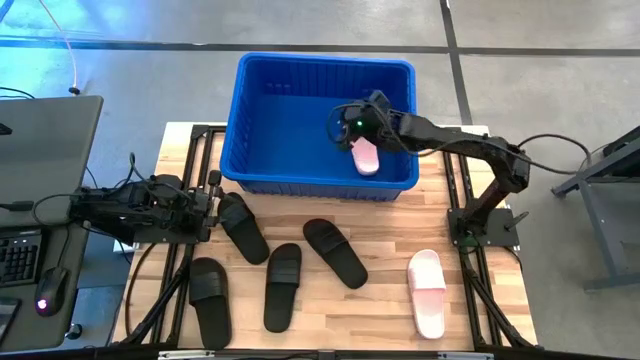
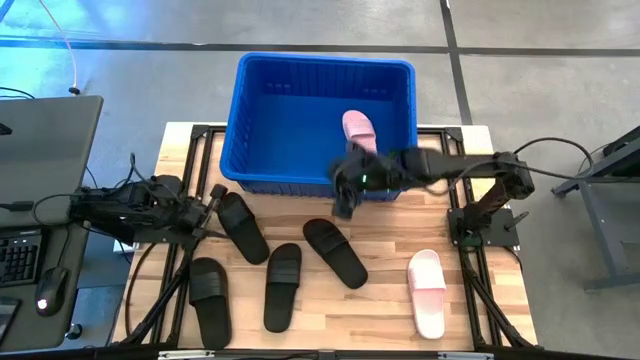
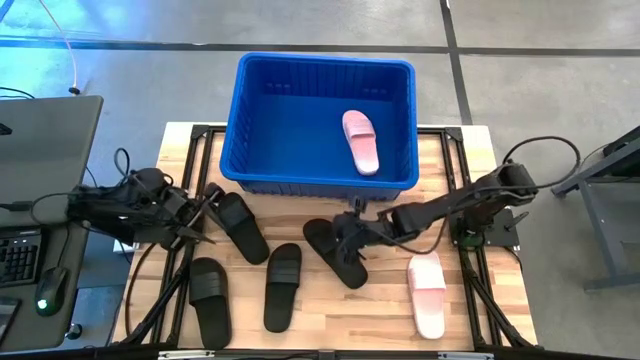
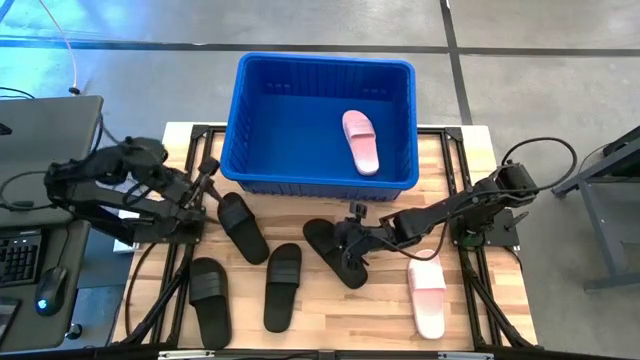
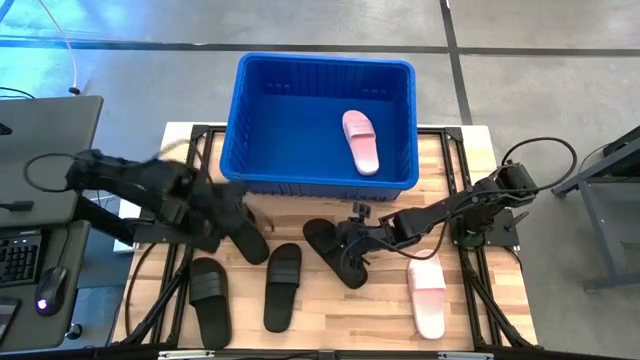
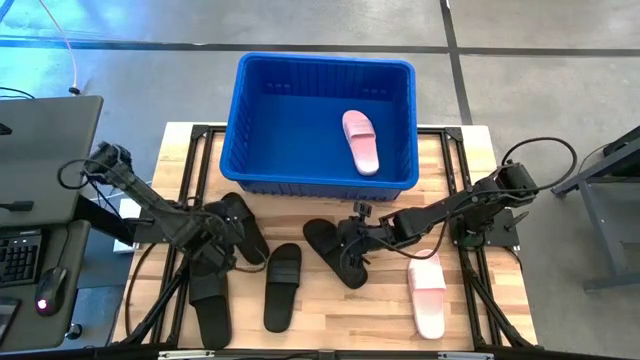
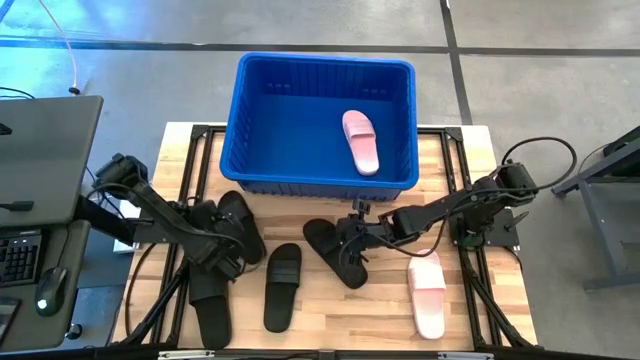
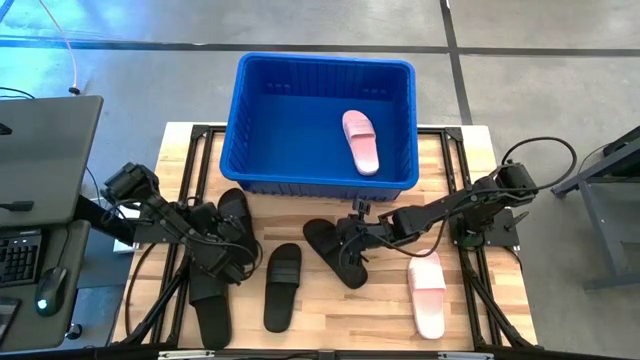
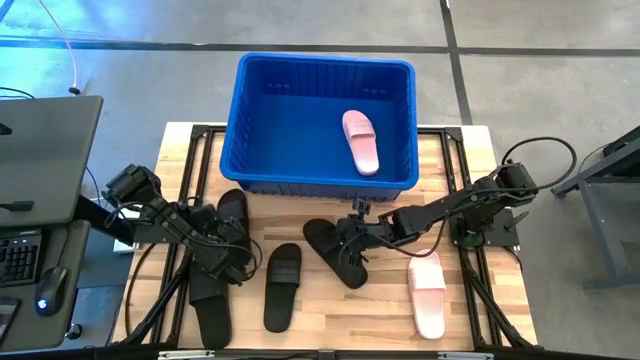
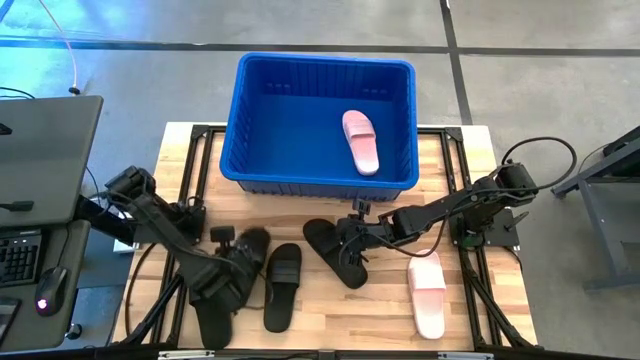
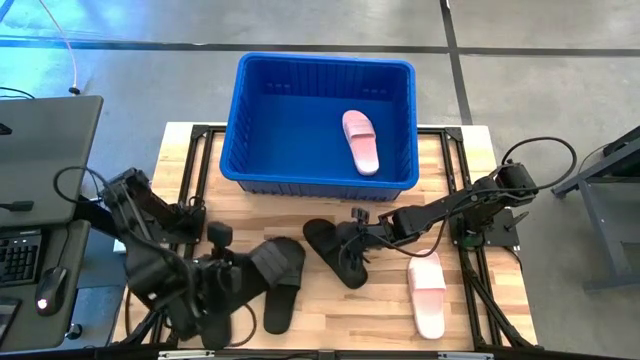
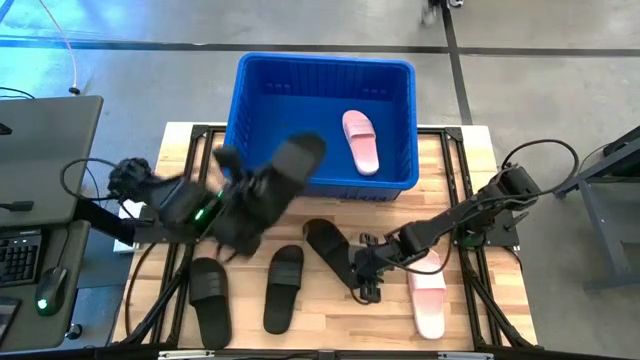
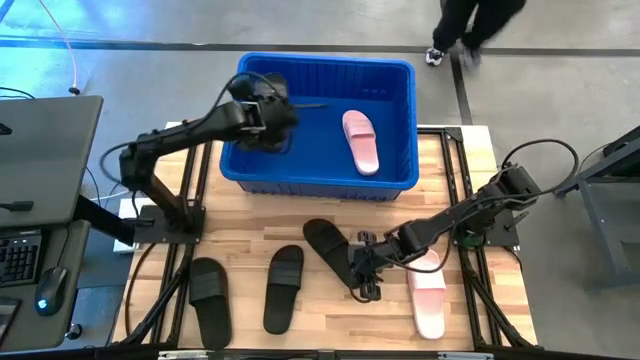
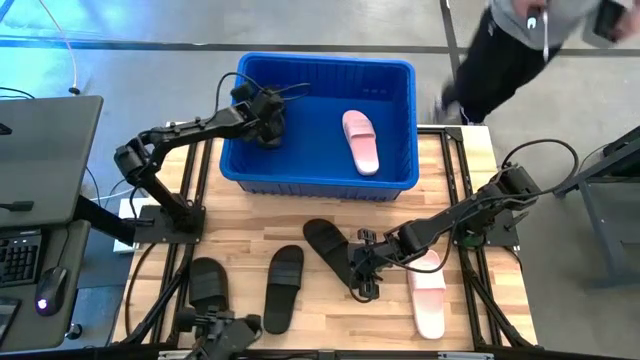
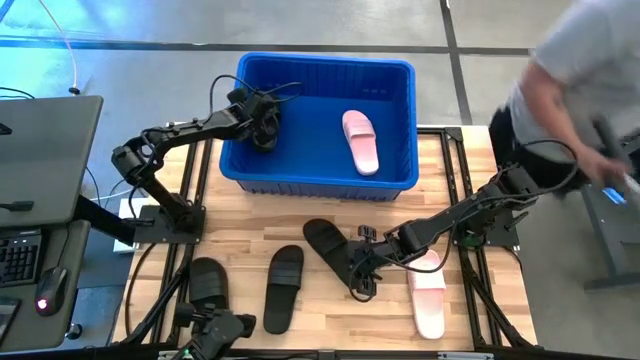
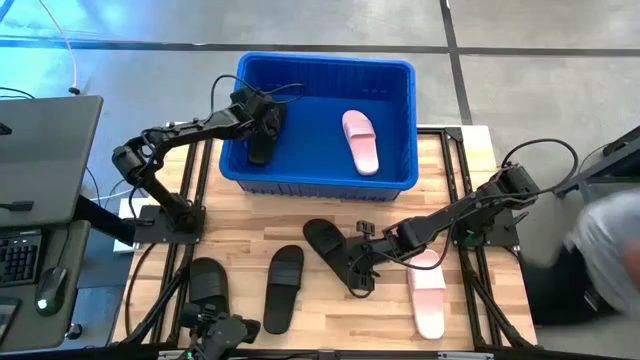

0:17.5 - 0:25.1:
Task: Pick and place slides into bin
Put the black slipper into the blue basket

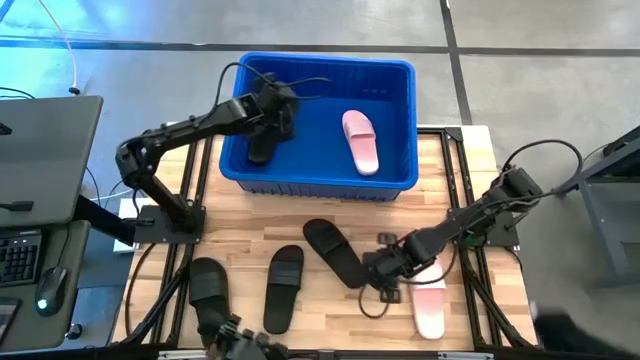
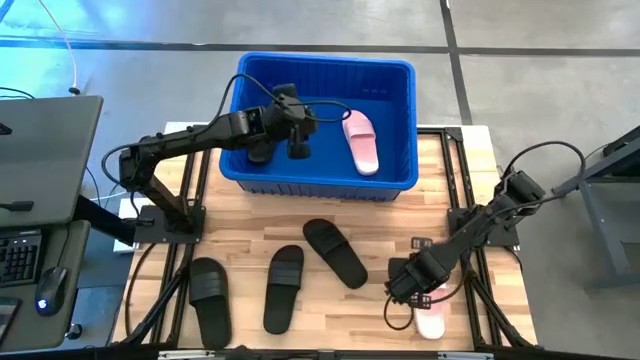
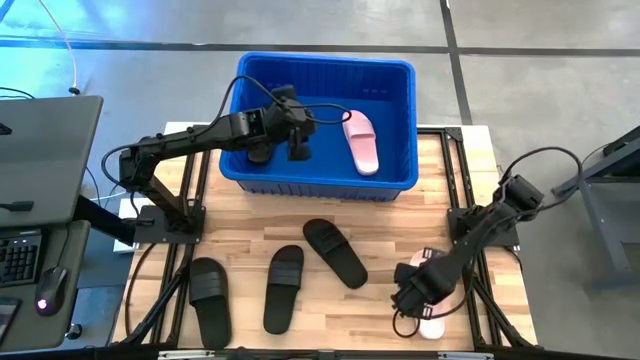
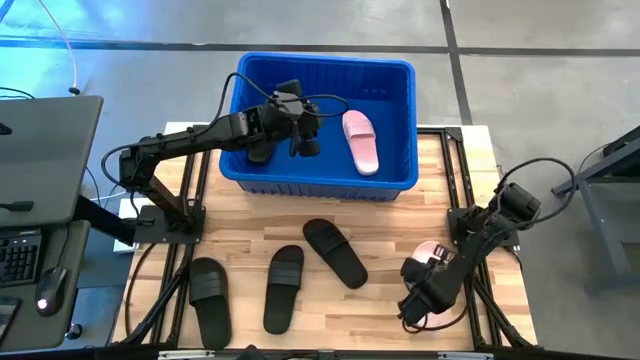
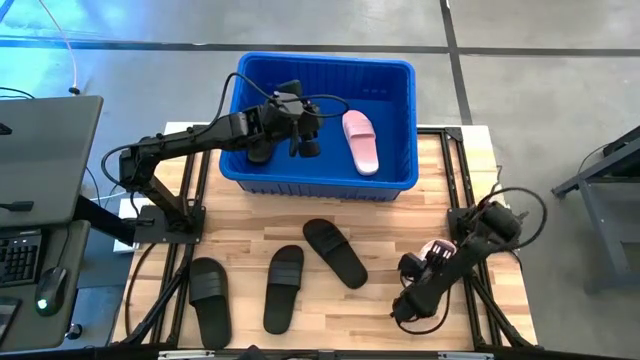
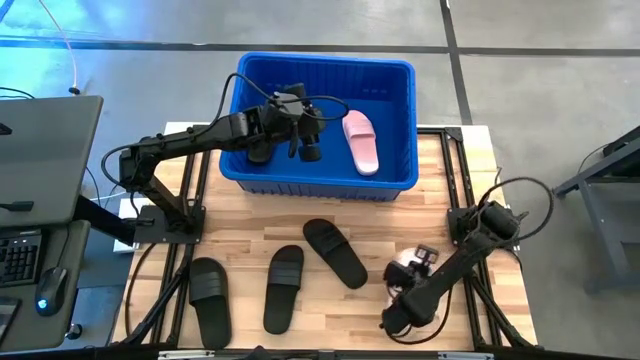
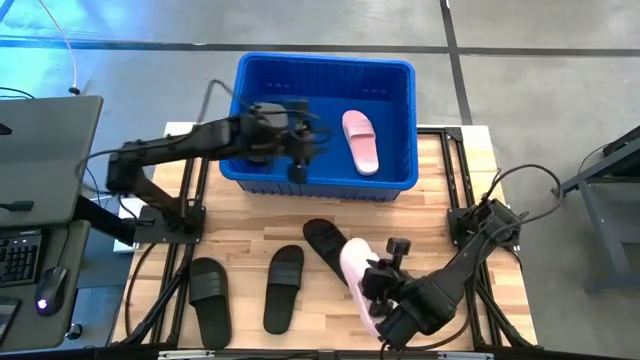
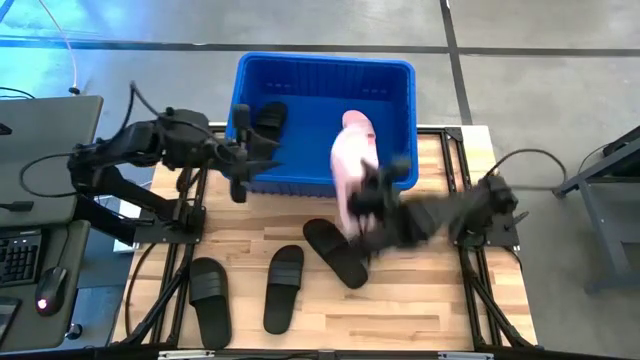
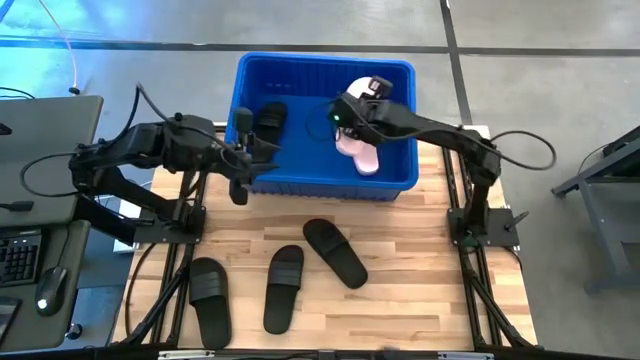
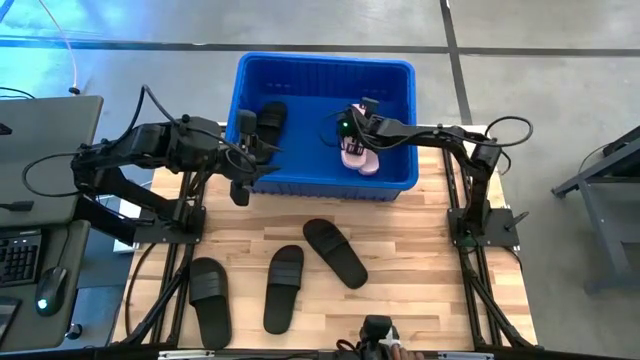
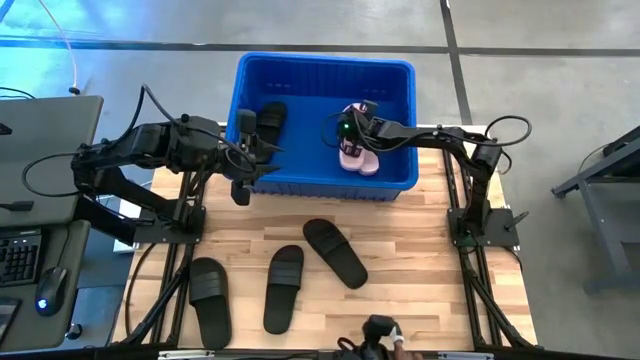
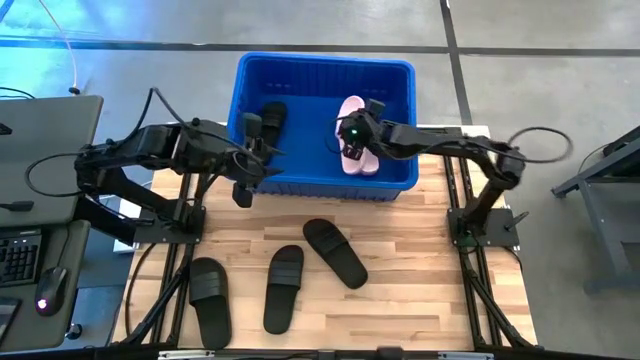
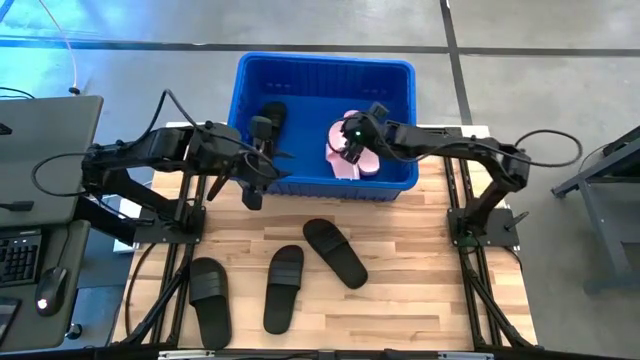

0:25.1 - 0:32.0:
Put the pink slipper into the blue basket

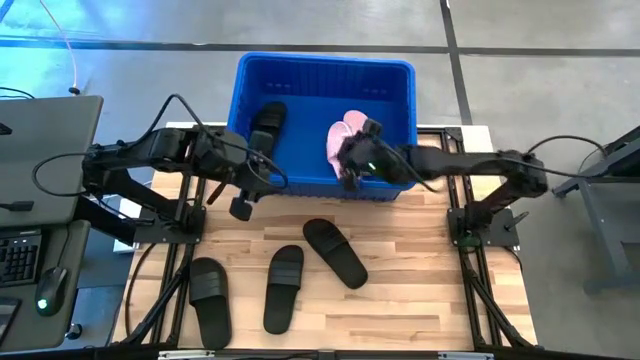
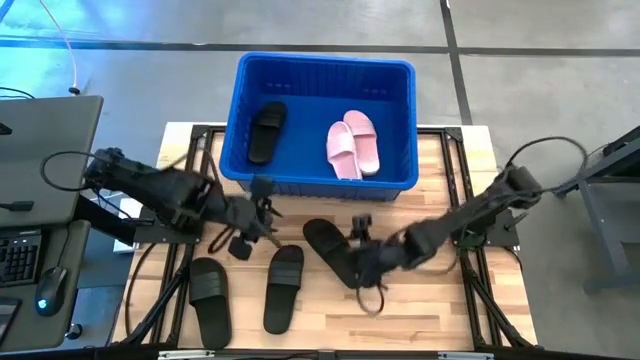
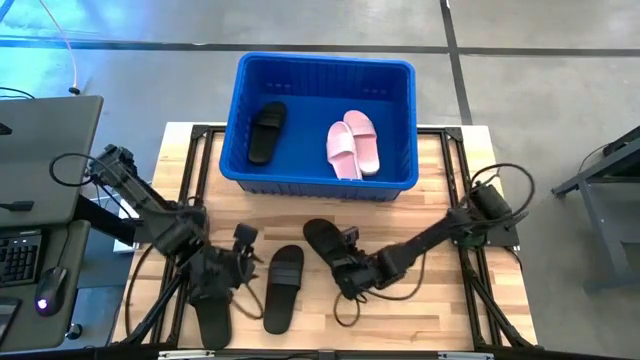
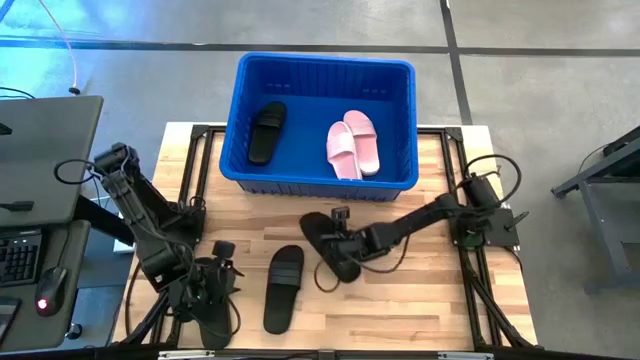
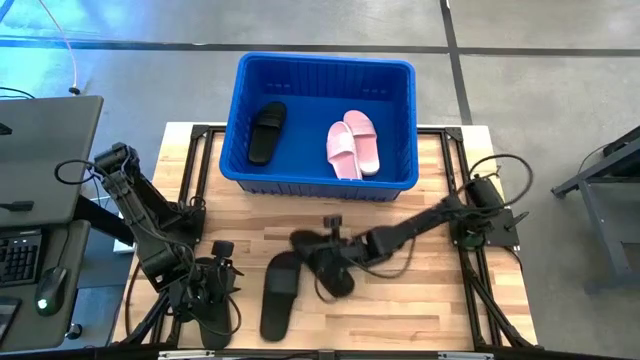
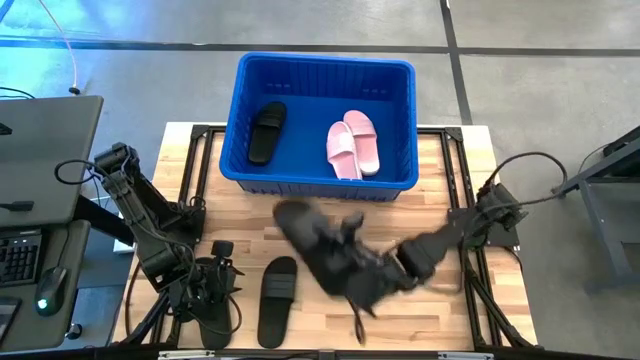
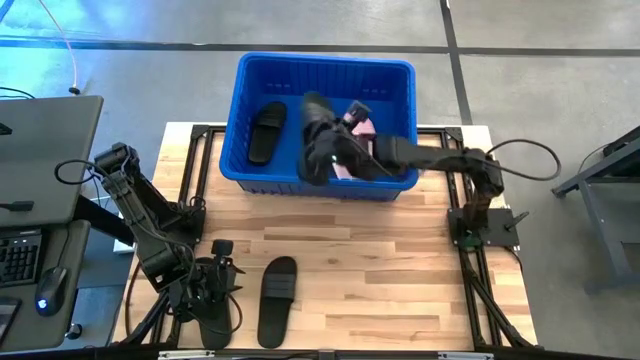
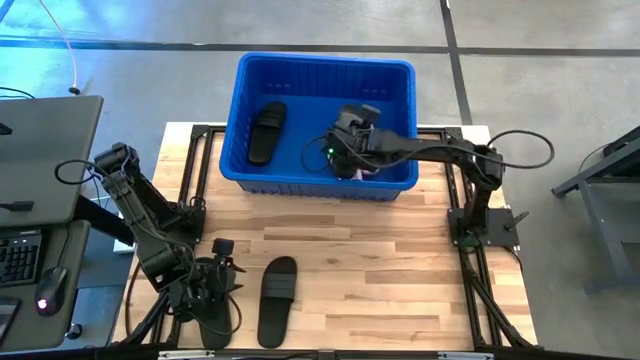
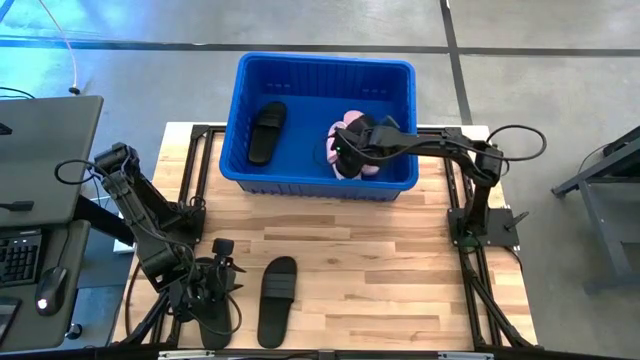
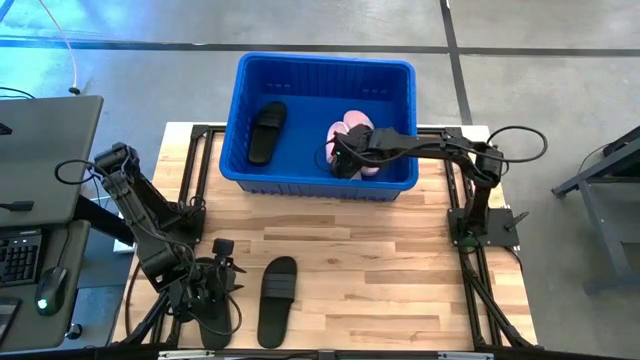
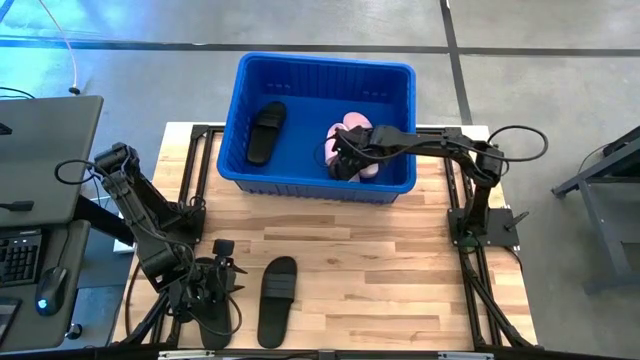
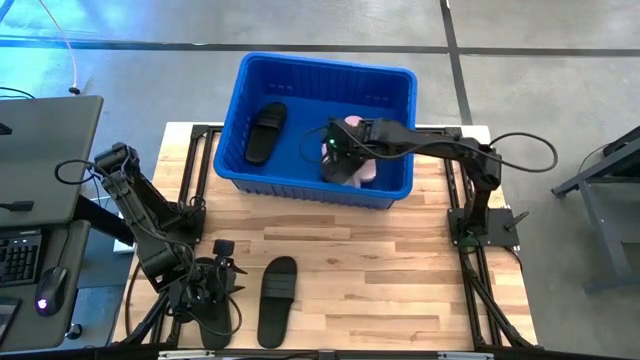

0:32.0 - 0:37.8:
Put the black slipper into the blue basket
